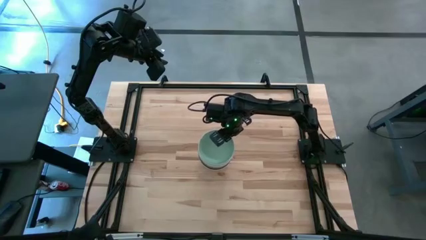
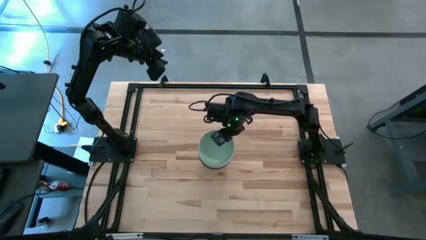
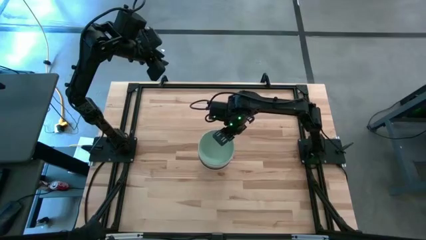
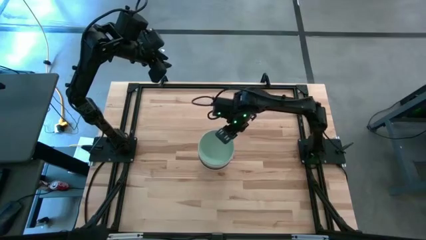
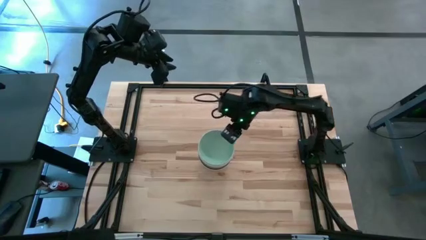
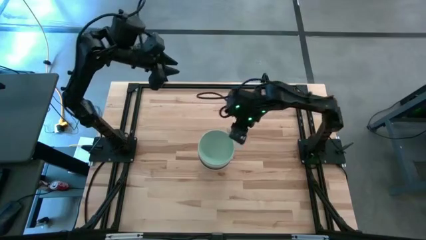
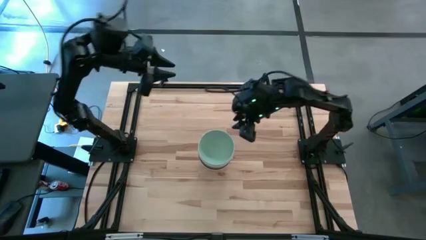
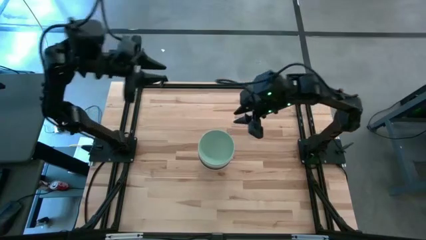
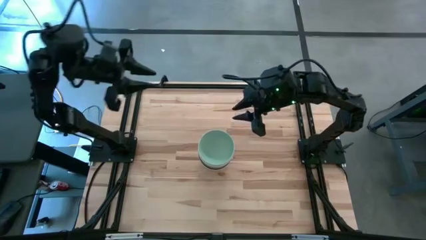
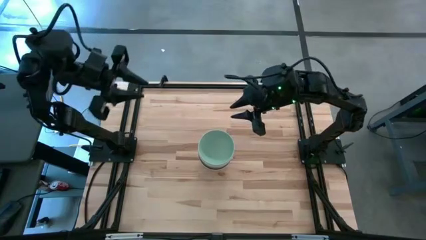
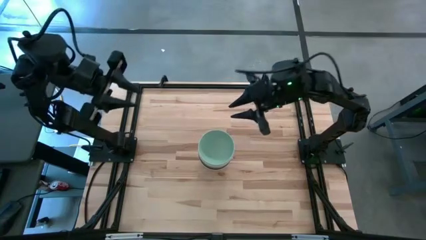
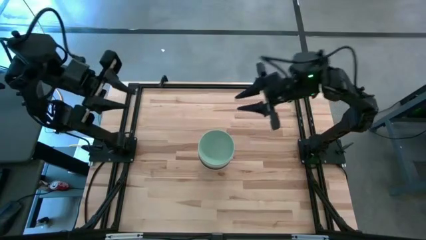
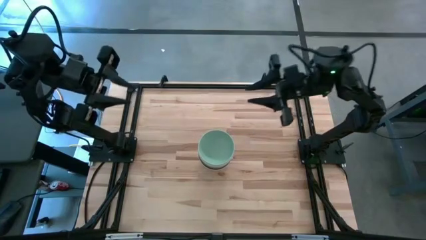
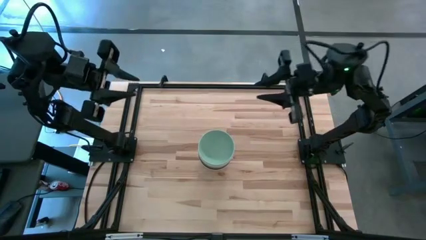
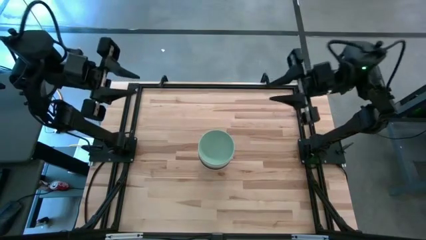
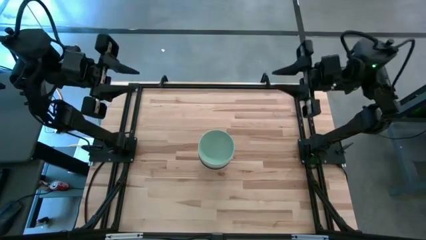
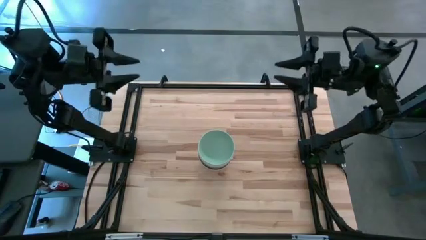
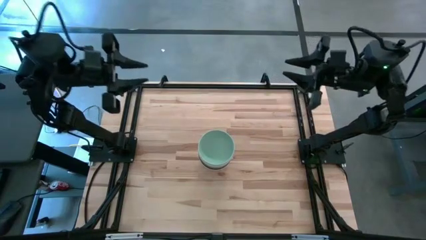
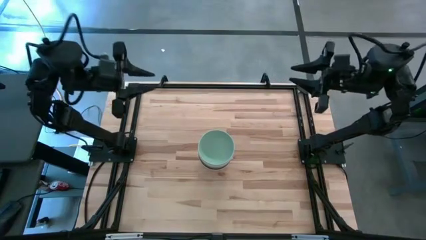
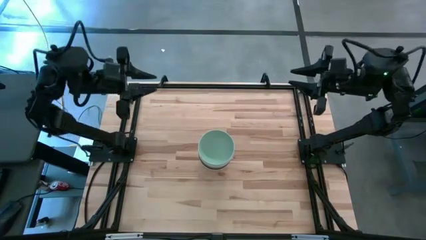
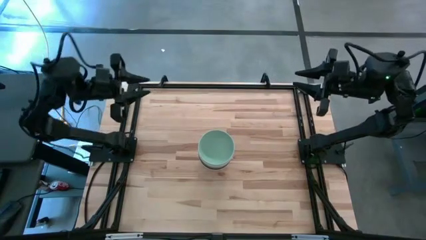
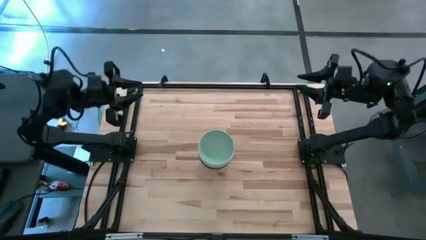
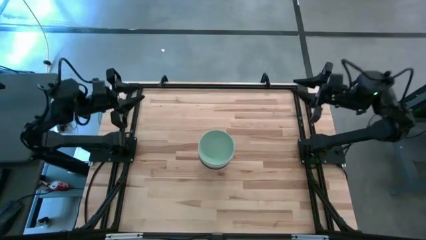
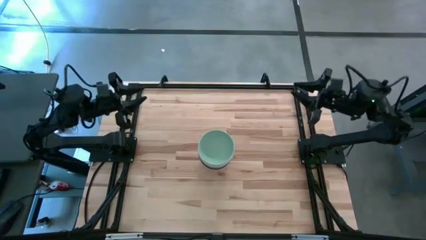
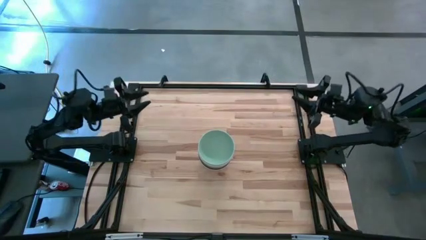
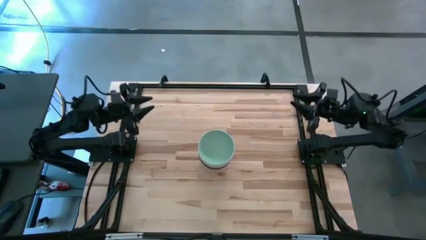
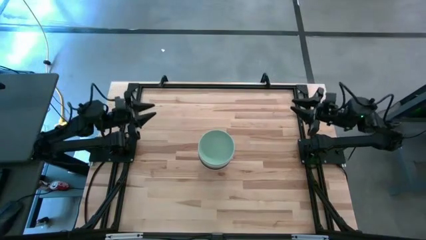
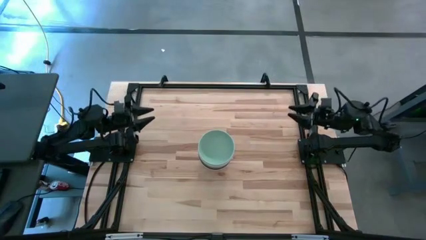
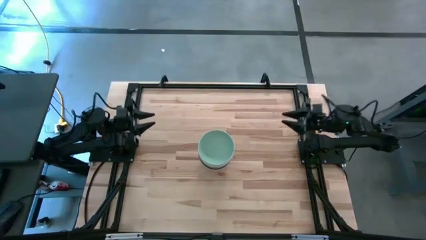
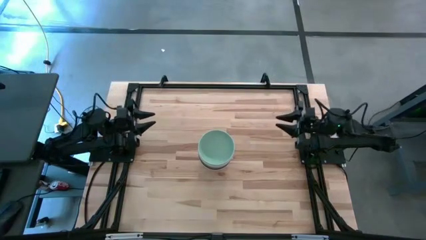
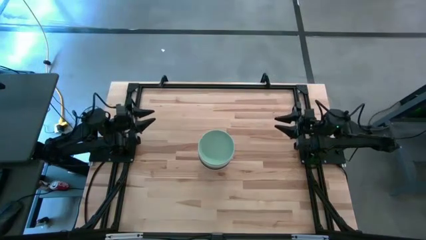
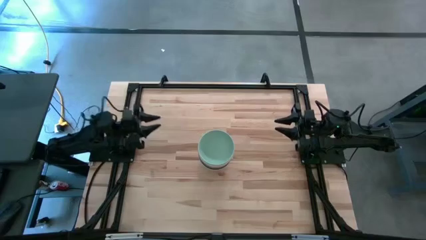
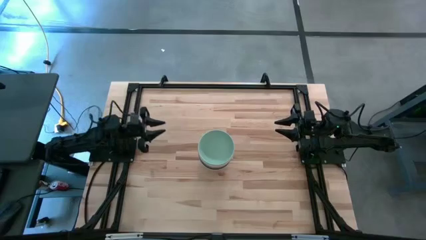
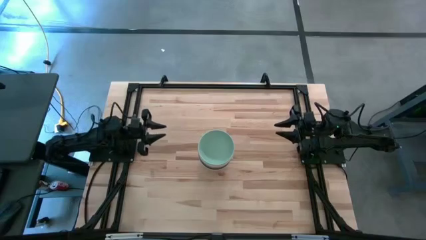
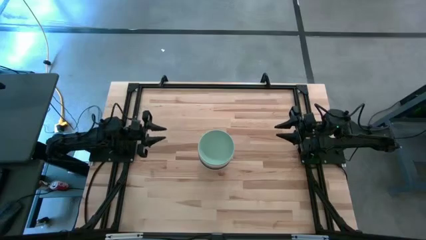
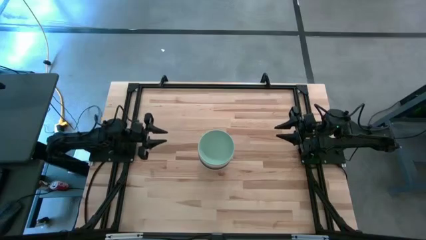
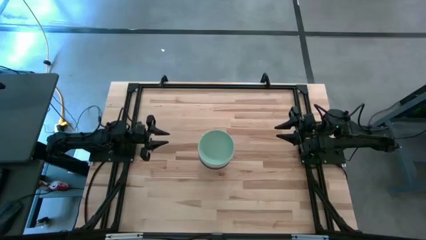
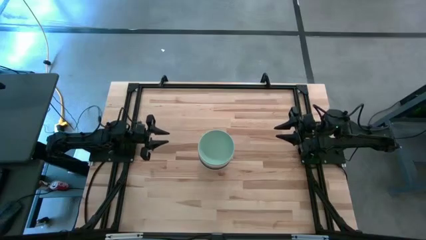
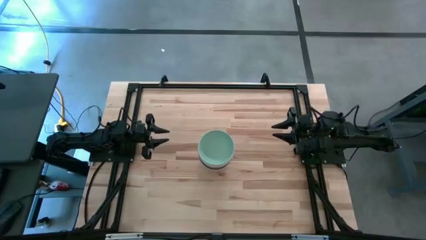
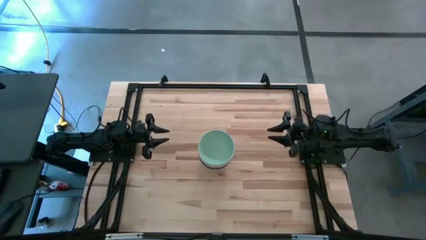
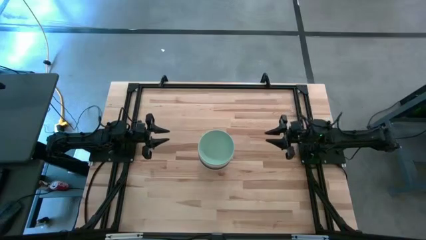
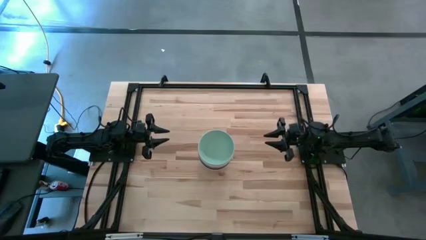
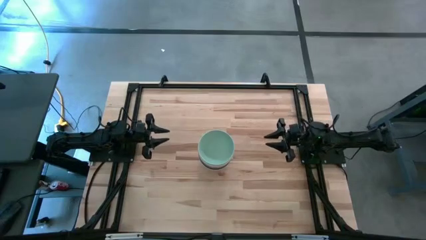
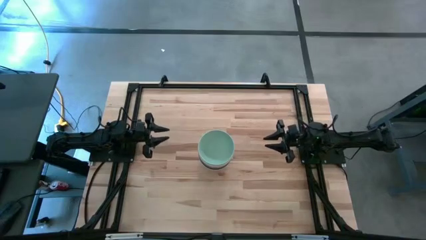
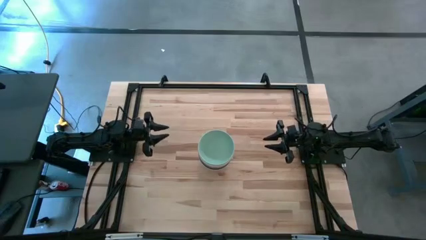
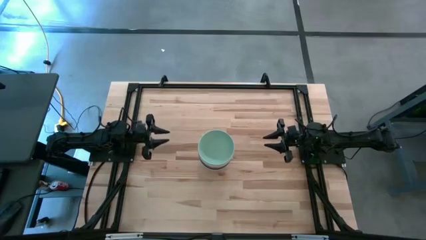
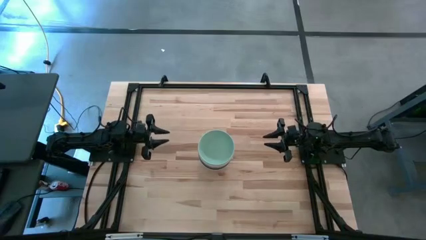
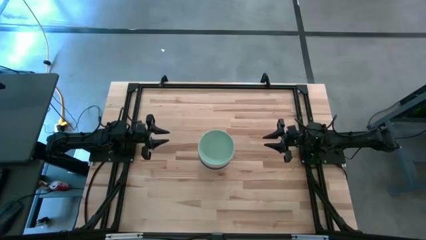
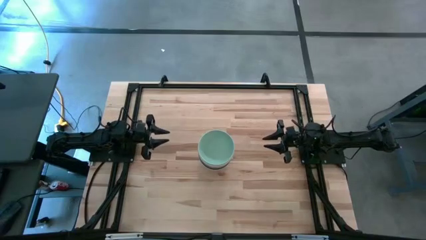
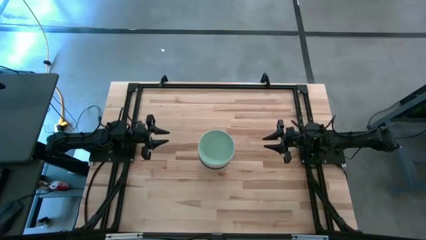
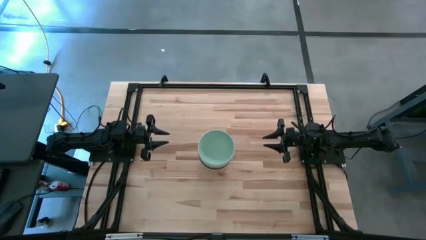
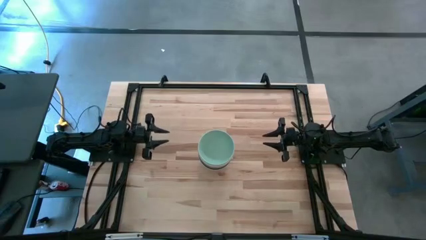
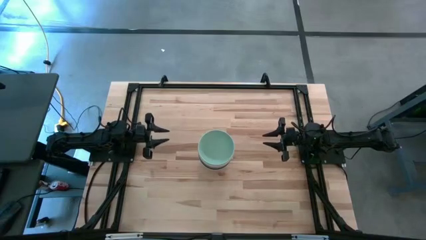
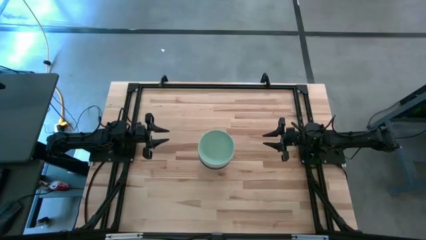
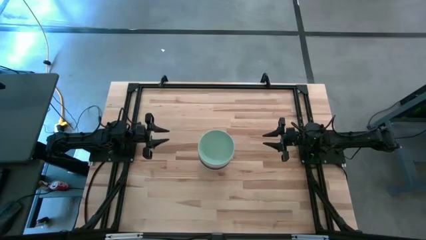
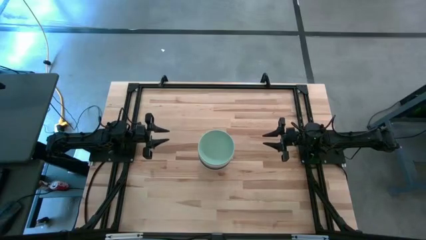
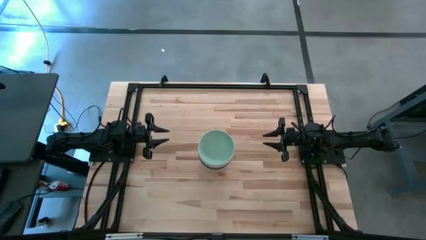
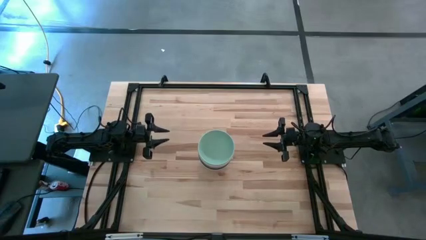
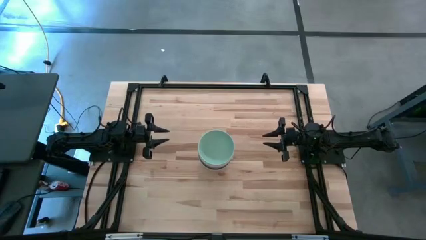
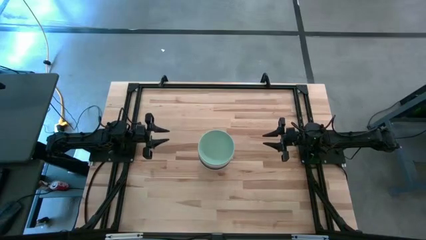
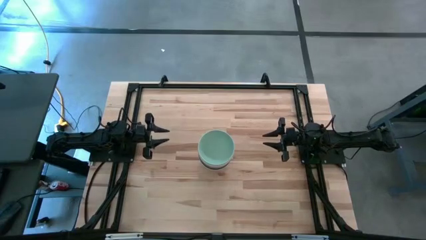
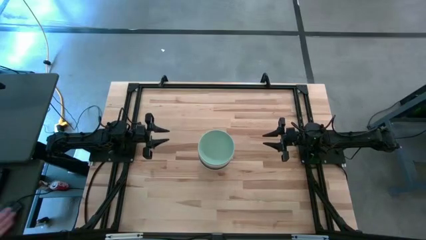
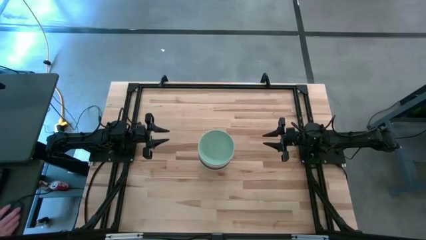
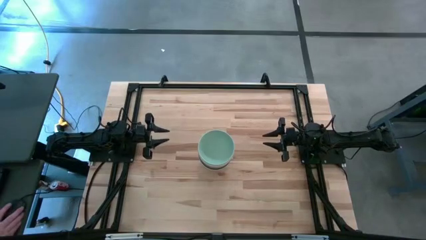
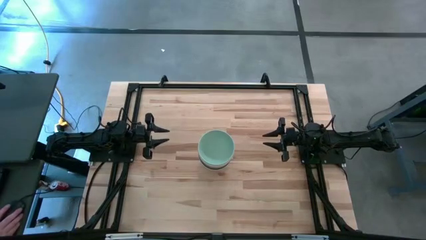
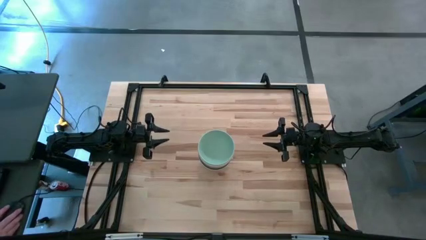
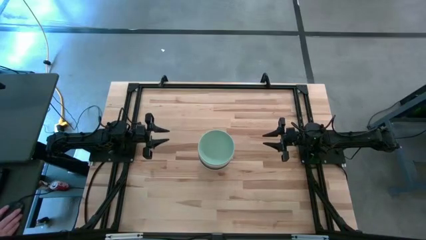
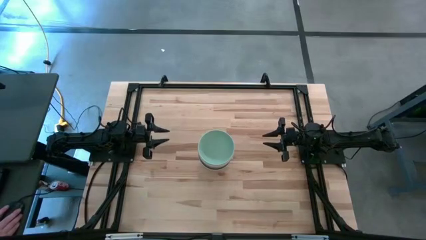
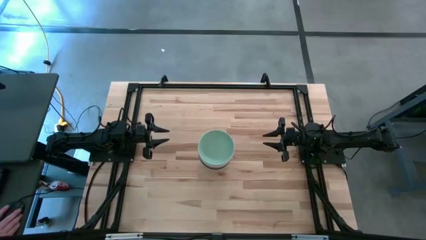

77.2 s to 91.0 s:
Task: Nest bowls inside each other
Return to Home Position

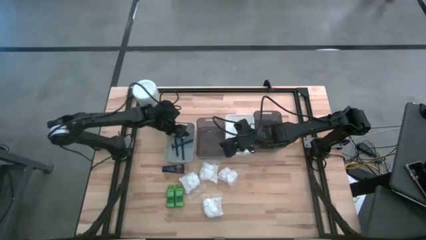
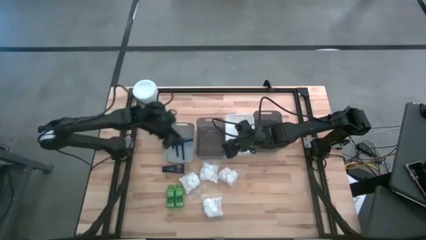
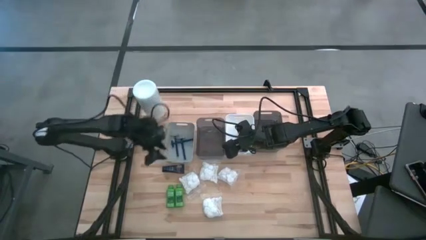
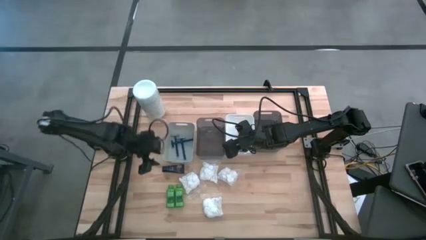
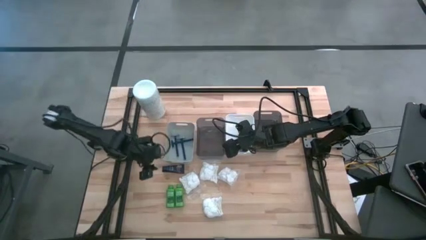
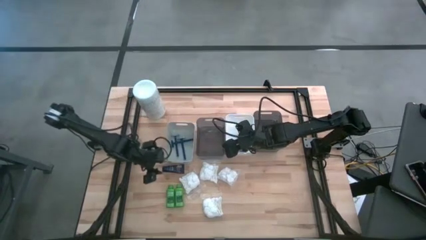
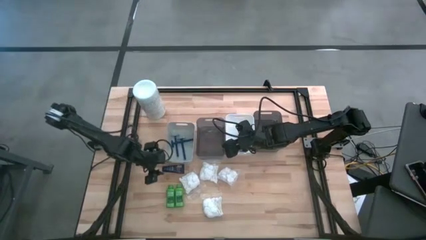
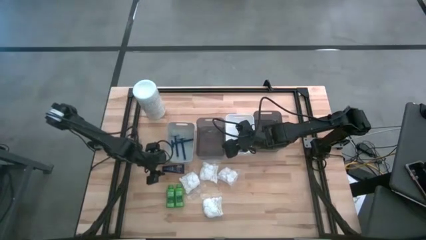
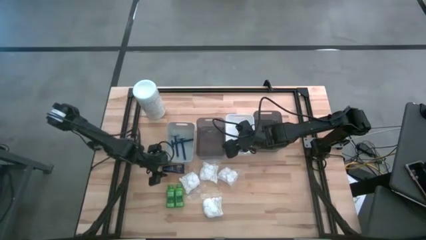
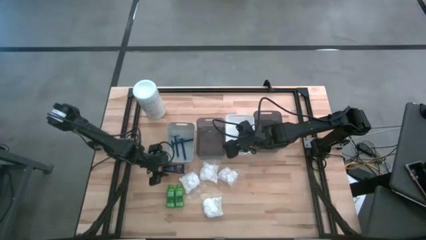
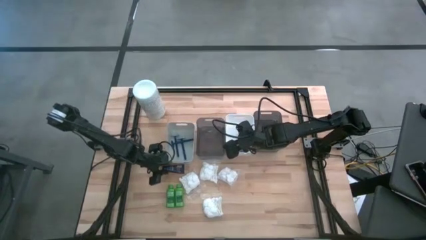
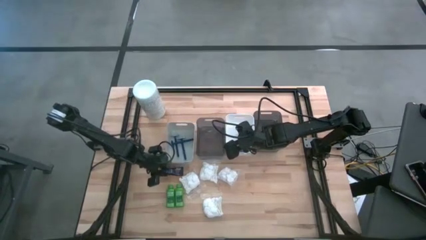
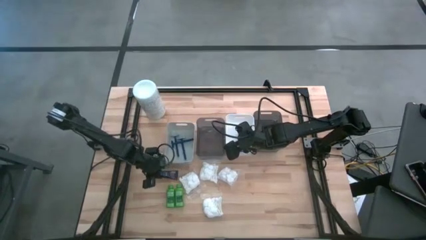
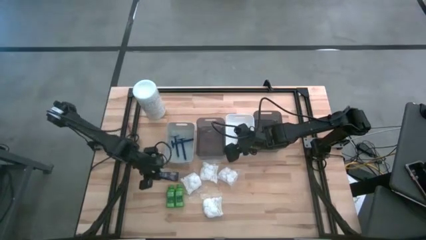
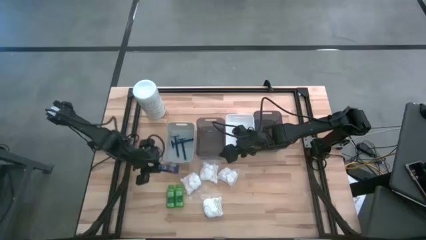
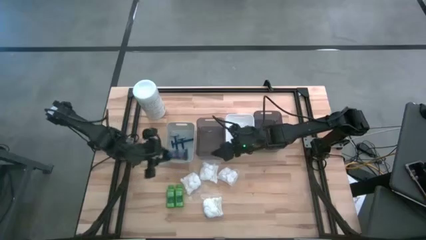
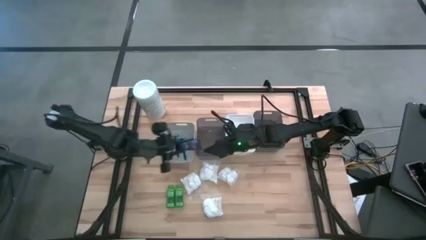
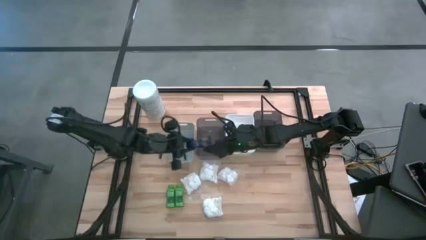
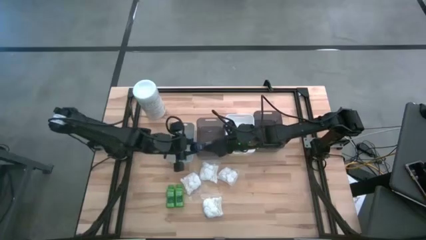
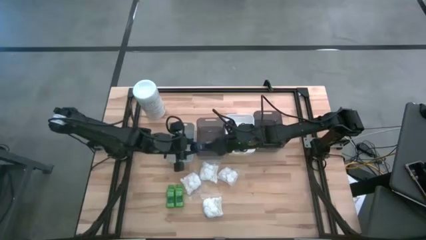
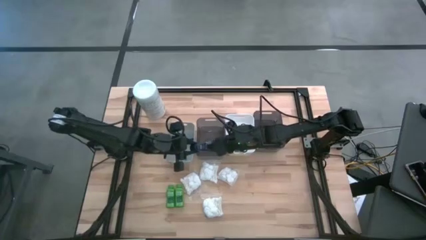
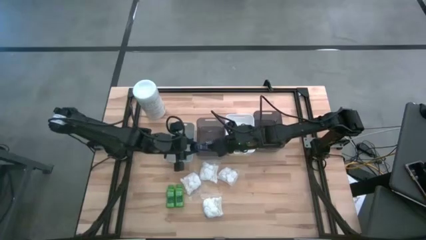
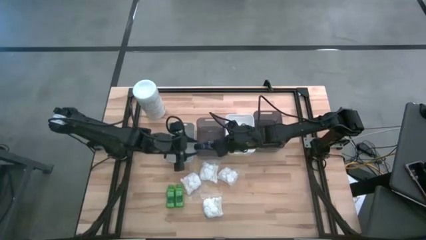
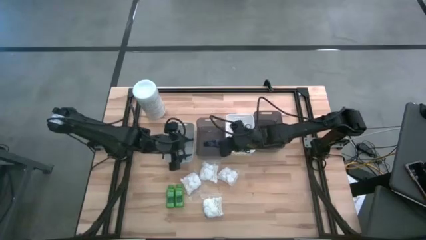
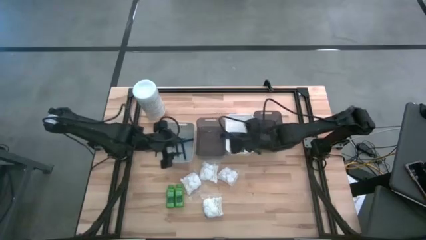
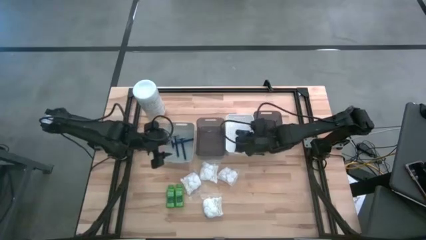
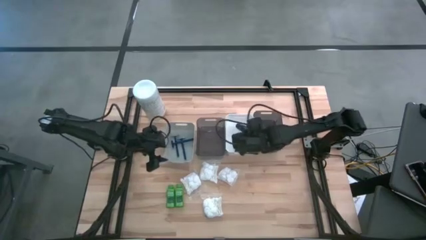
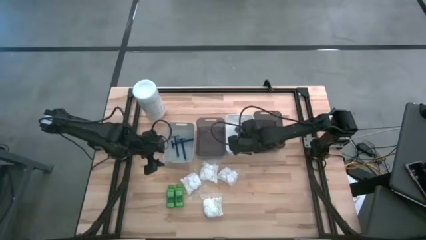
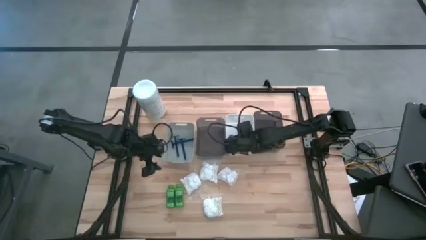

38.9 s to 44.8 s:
Task: Pick & Place Travel size toiletries
Put the shave cream into the white bin
